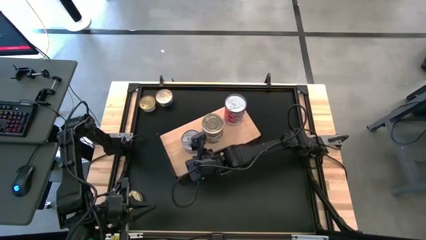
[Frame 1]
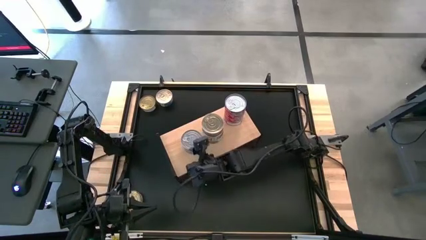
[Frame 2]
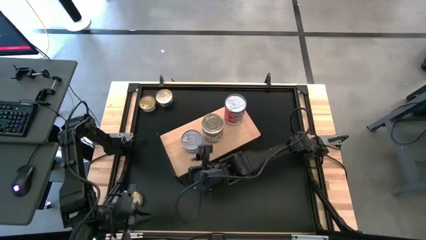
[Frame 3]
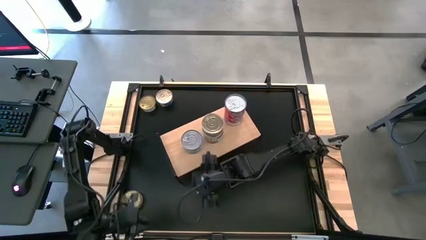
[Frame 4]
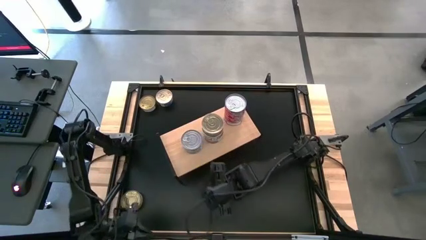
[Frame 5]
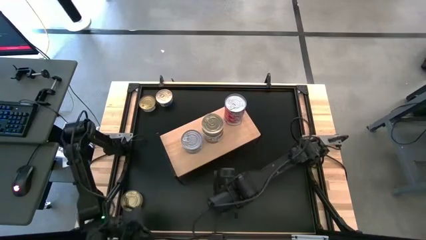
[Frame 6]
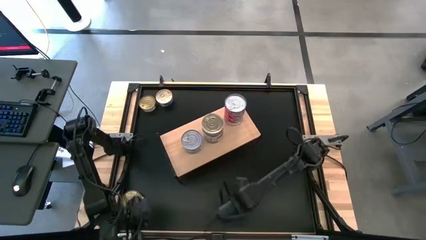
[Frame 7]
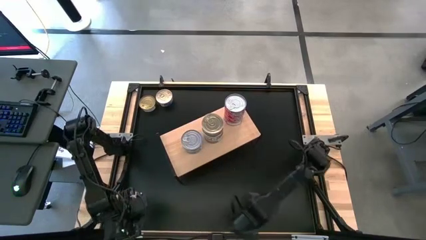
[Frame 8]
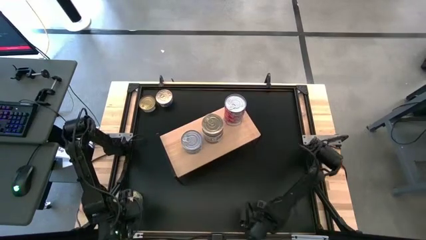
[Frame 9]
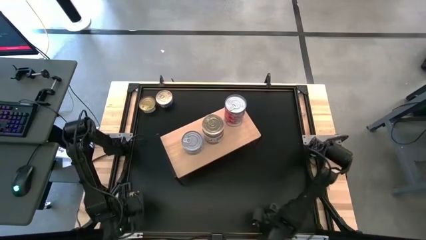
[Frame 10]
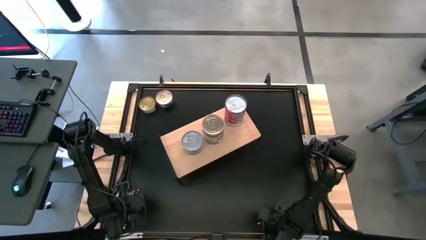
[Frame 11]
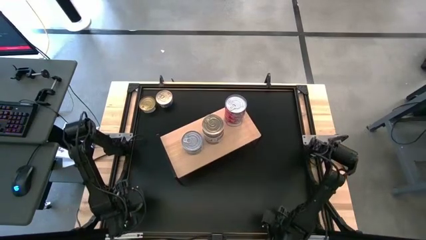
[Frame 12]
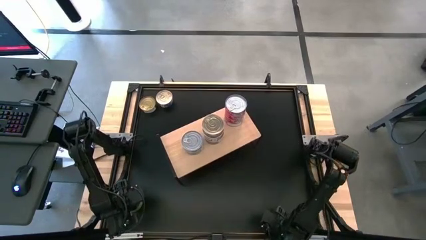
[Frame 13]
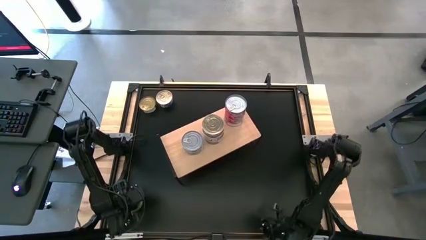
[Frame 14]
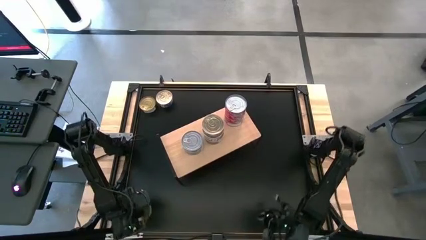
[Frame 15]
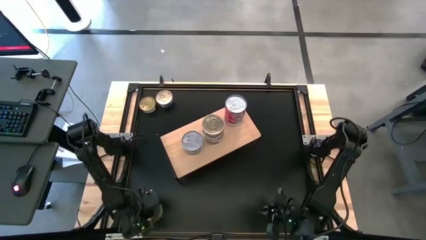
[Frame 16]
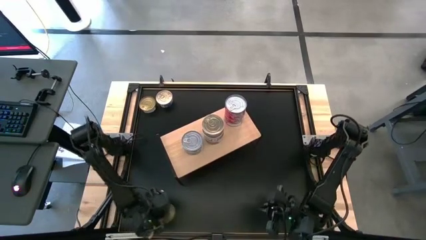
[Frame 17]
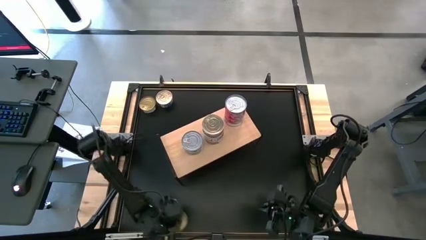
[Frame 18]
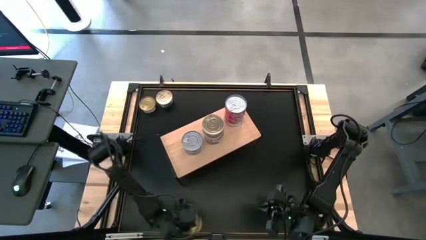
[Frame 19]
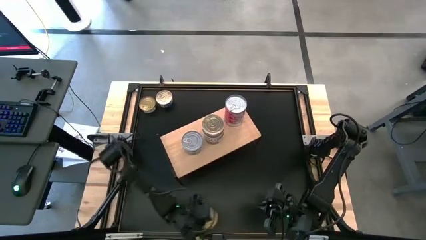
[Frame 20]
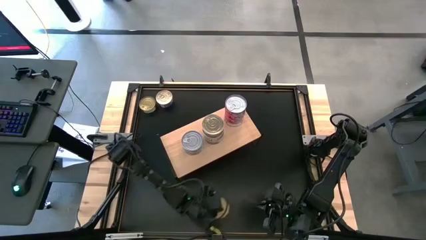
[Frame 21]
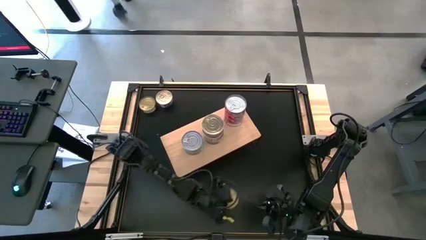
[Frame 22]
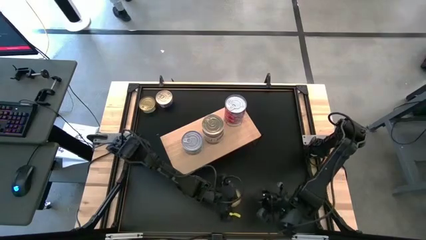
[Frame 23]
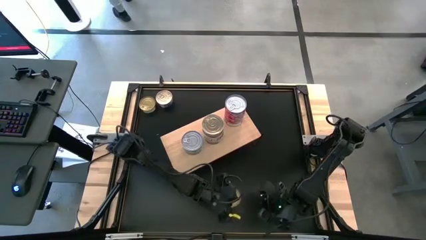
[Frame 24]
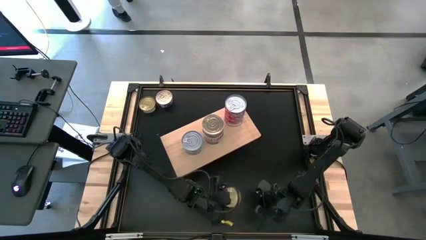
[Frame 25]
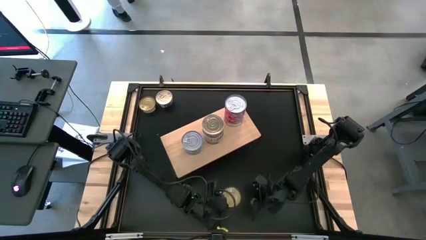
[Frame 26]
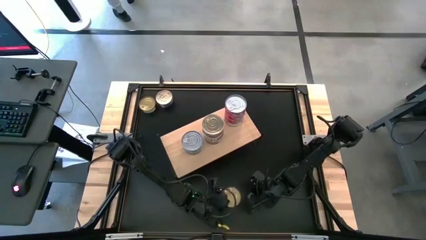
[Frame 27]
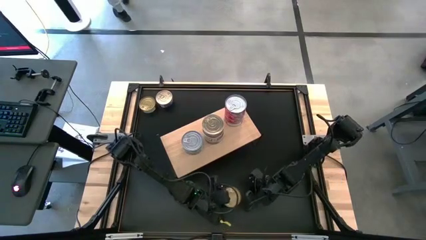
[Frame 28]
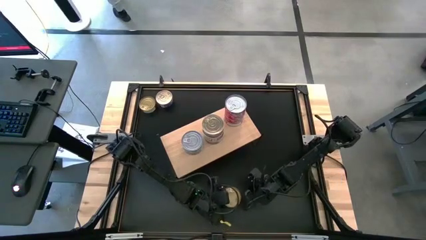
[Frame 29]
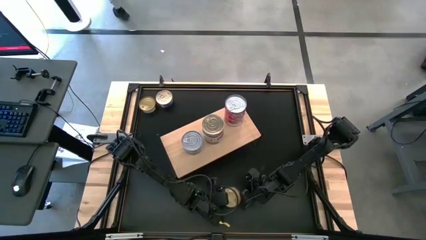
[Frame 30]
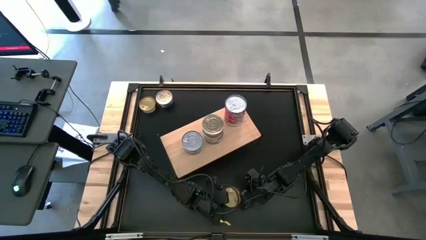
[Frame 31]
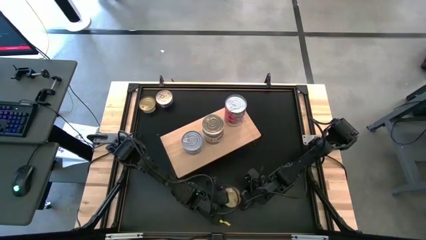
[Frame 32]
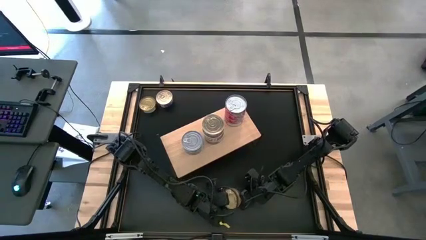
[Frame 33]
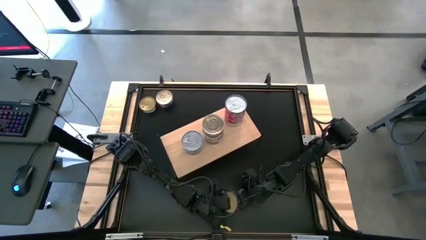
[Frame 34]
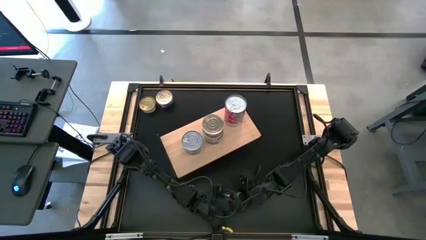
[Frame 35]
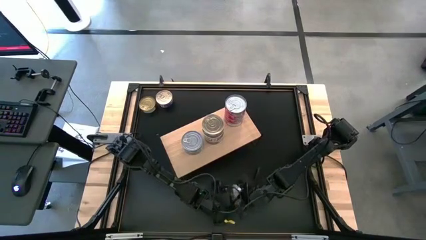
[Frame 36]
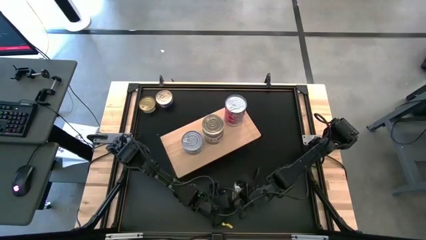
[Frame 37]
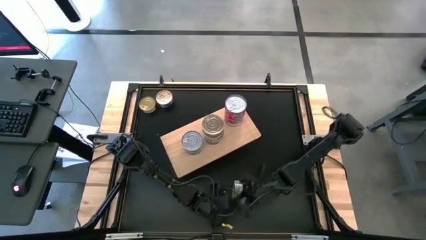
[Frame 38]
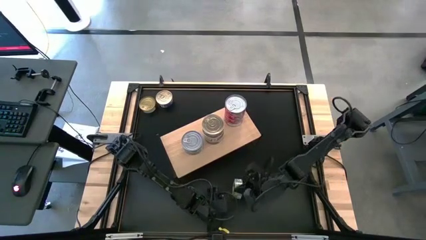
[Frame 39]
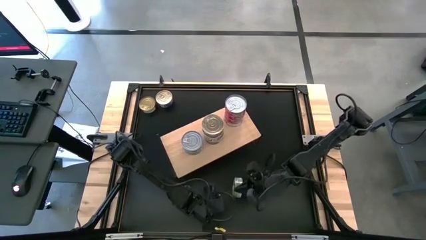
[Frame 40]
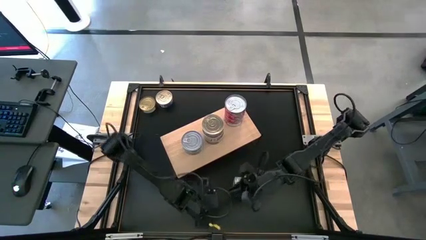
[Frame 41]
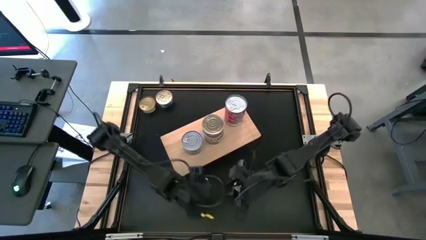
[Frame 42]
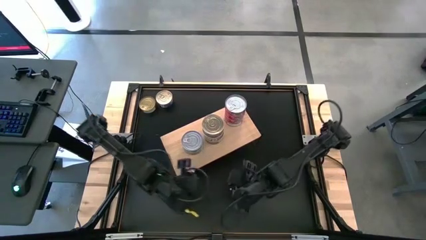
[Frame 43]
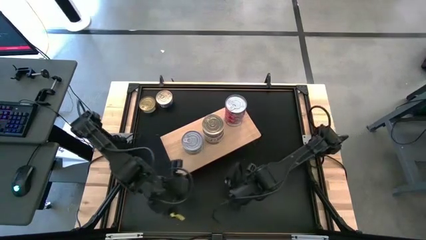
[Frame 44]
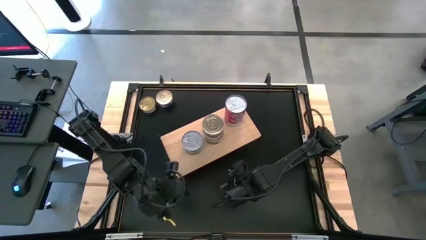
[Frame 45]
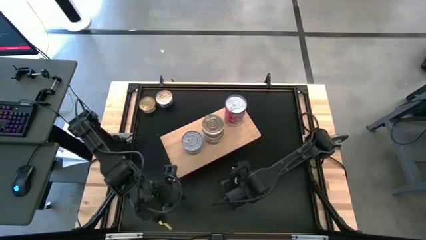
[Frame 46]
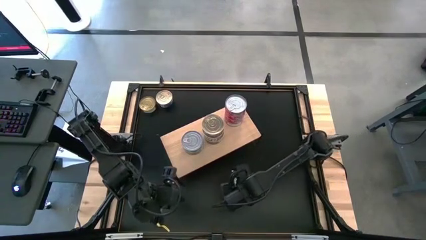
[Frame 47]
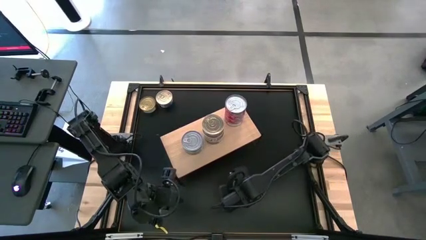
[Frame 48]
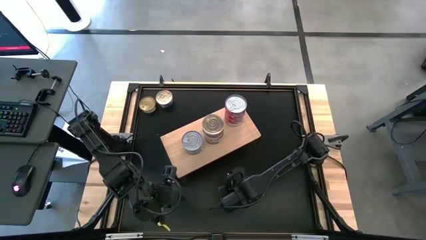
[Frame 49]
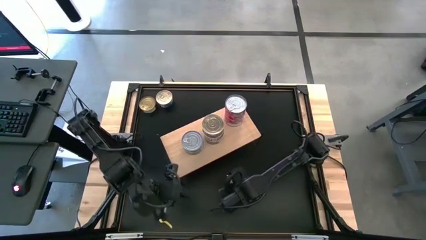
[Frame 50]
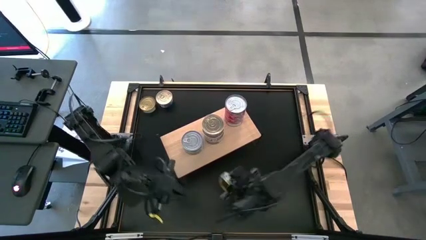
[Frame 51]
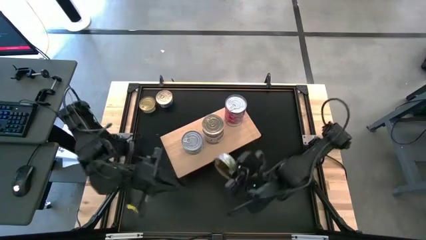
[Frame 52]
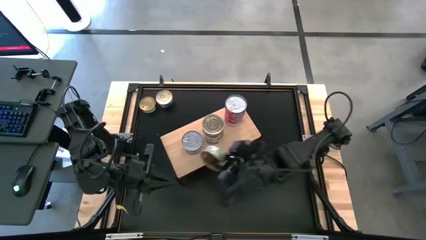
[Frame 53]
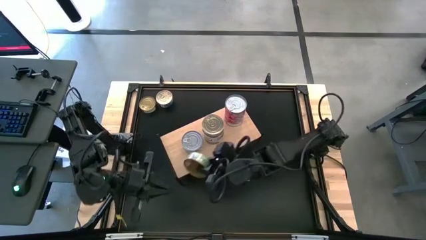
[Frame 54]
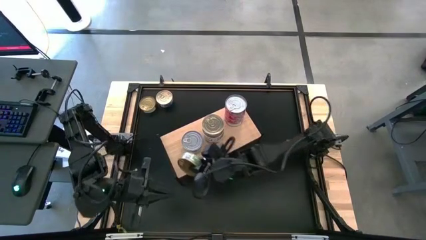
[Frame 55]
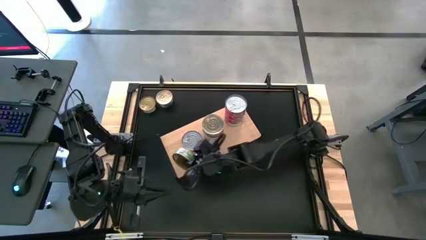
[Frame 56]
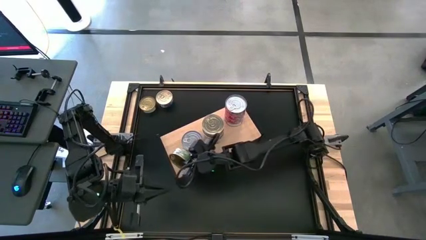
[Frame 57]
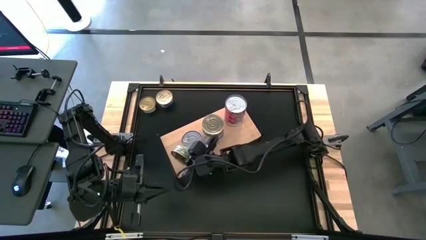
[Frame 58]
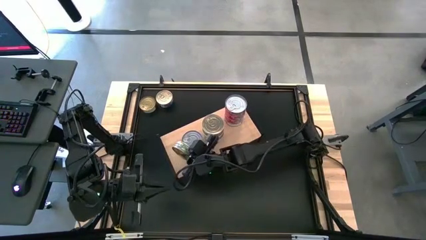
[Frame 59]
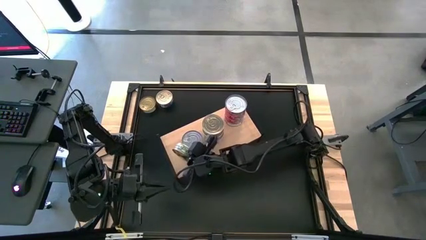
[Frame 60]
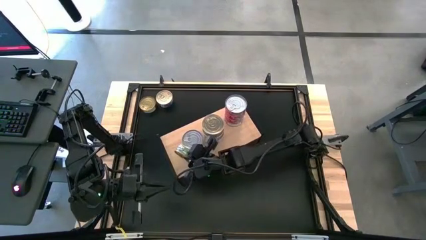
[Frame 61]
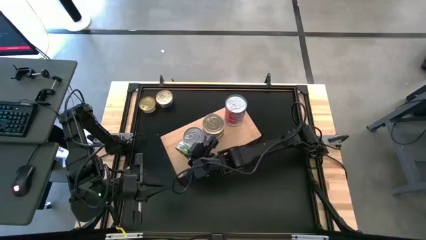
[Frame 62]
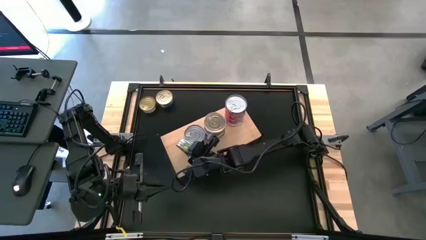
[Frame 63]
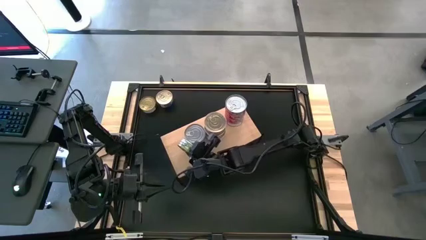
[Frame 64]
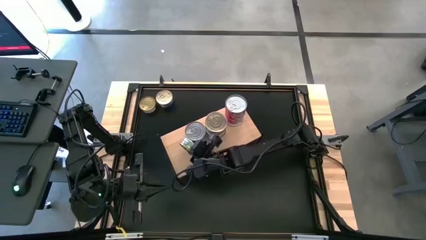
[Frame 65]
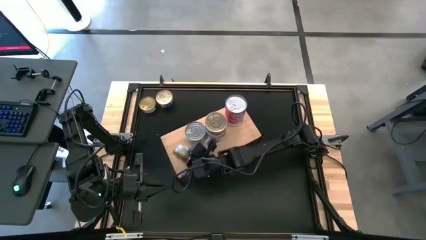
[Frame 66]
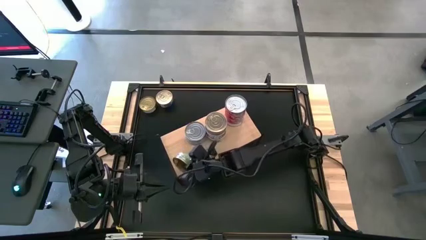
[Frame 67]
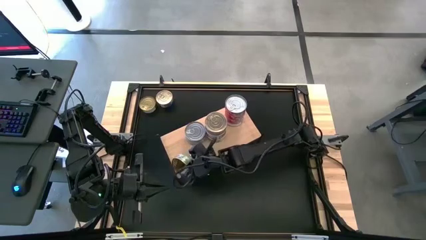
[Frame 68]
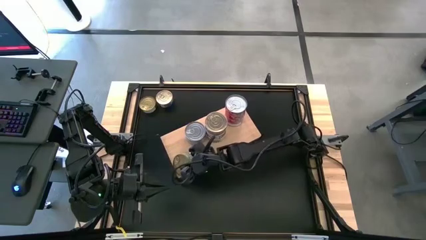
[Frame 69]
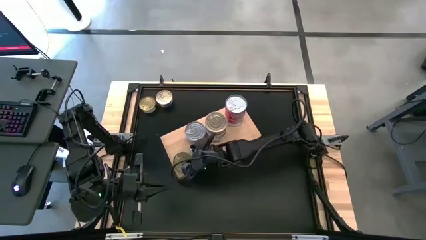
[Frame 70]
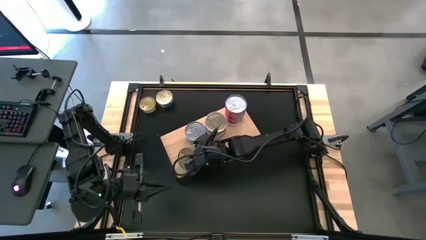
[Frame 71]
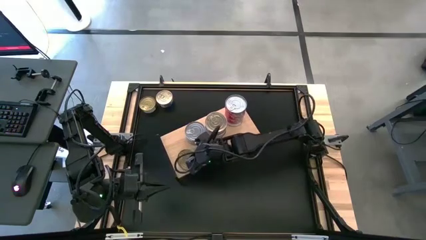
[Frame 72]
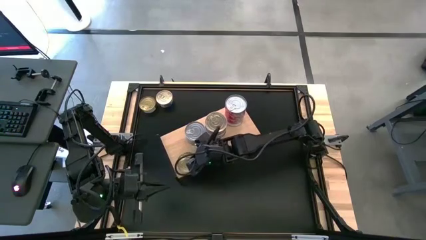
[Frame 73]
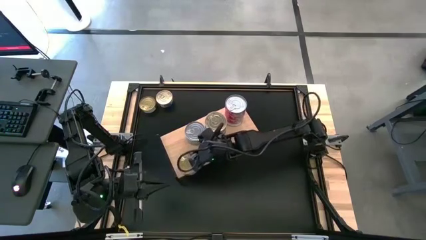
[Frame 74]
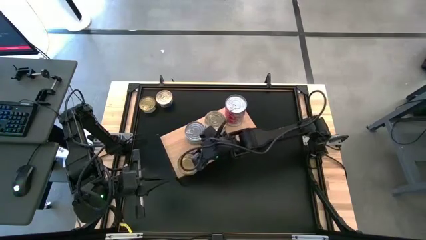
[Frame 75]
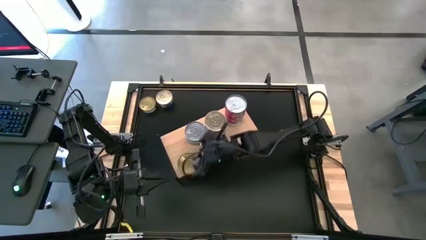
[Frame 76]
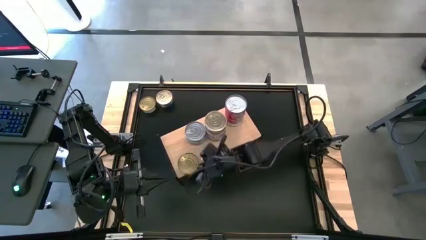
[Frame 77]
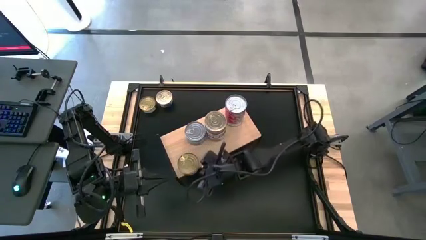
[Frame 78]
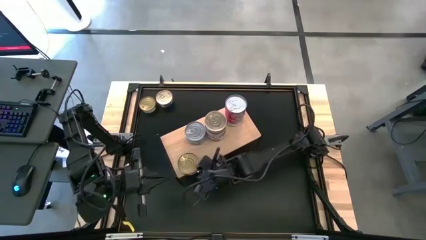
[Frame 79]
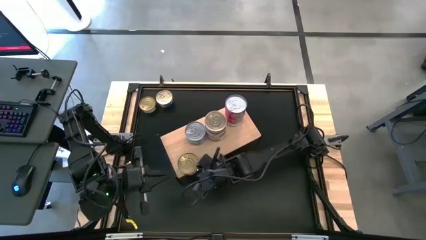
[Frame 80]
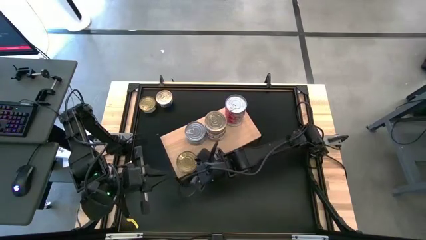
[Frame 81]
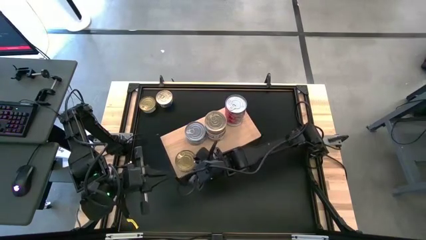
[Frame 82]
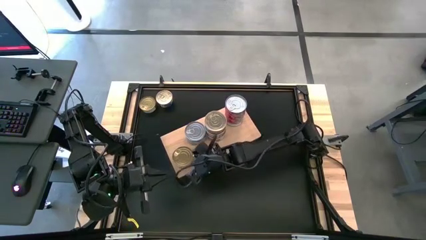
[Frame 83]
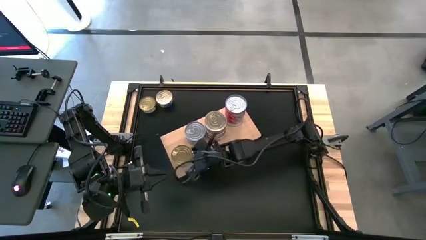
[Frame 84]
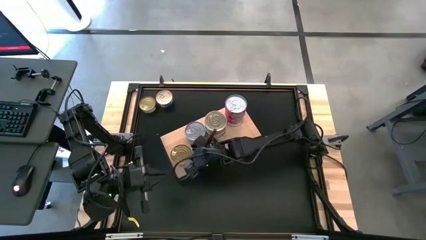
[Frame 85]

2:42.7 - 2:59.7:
Task: Stack canned seafood by type on shelf
Put the green tuna can on the shelf

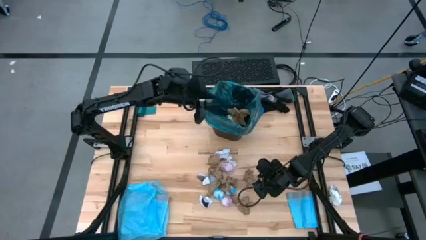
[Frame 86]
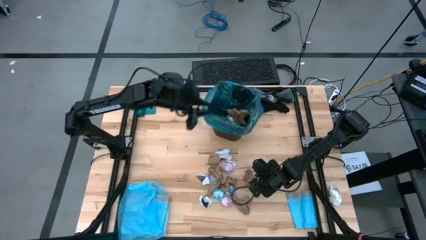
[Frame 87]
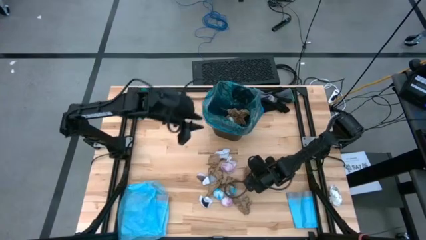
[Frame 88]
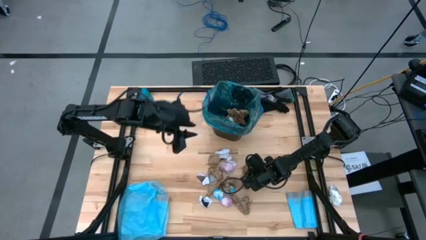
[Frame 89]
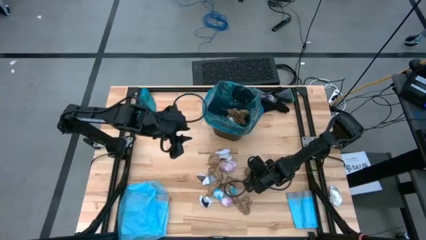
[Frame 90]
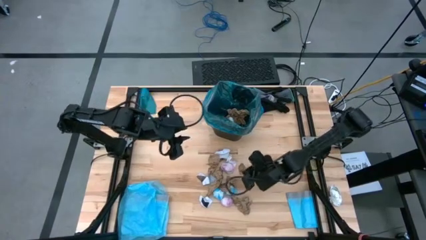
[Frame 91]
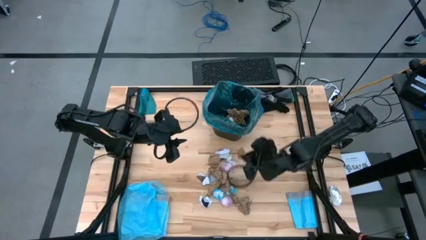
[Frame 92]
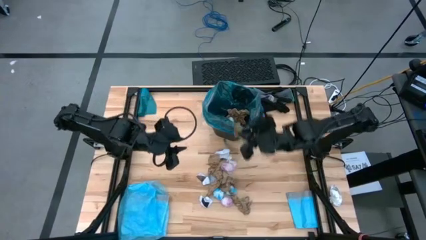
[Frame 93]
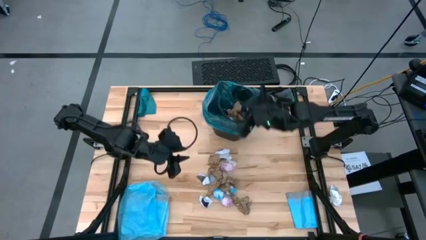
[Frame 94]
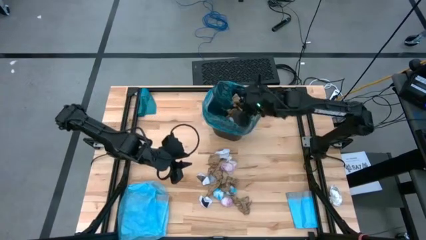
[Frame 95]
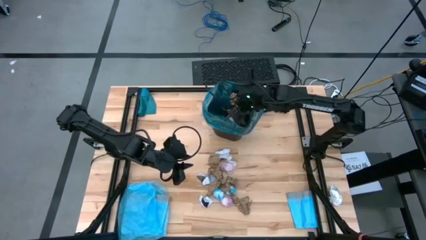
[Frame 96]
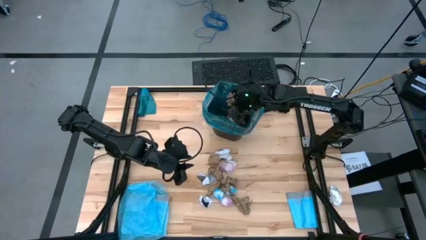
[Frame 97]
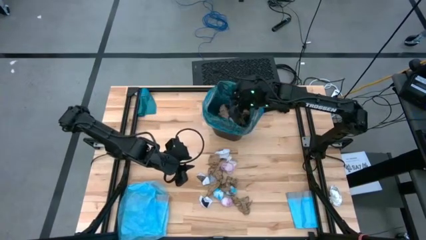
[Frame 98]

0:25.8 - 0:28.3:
Task: place trash/remove bag and relplace
Put the brown napkin into the blue trash bag inside the black trash bin
